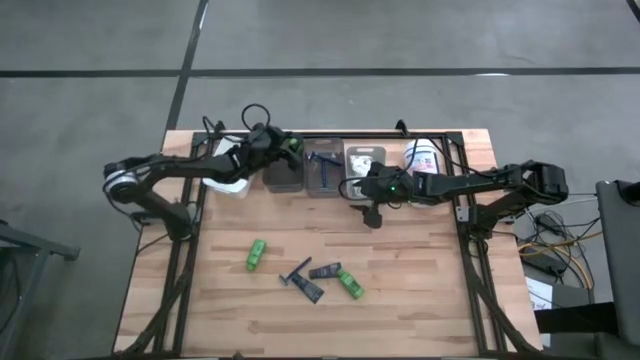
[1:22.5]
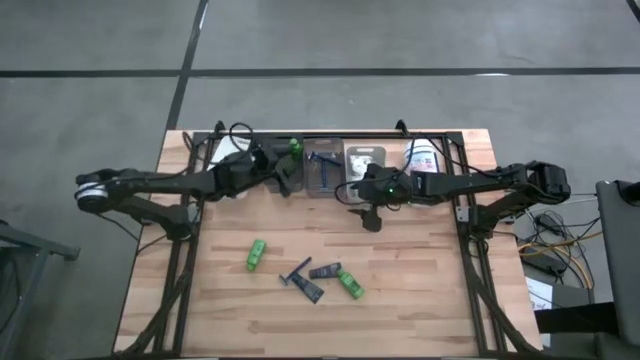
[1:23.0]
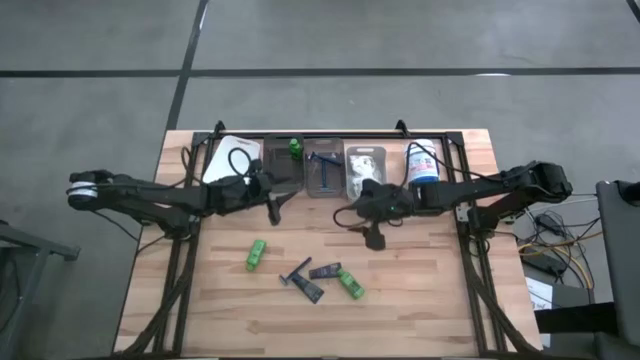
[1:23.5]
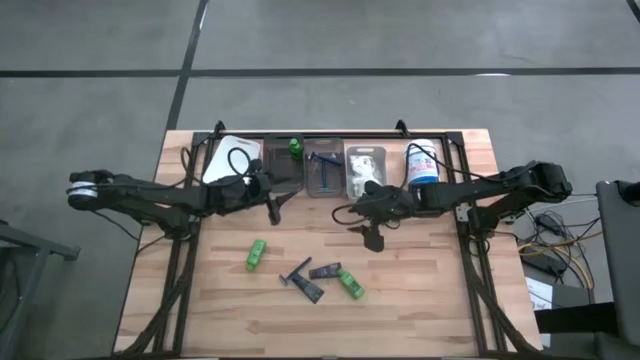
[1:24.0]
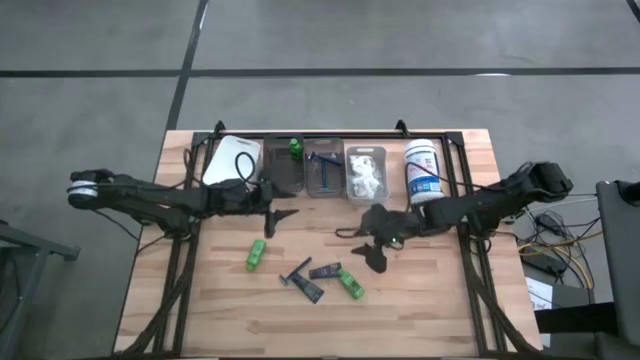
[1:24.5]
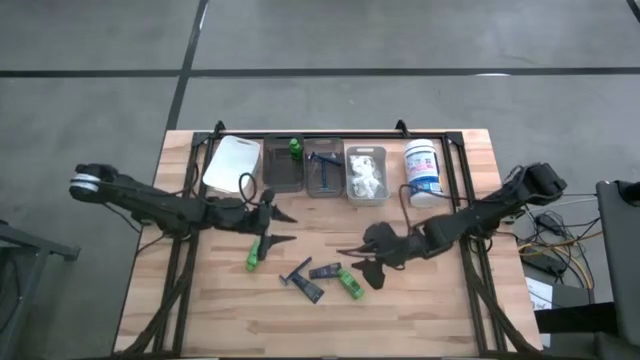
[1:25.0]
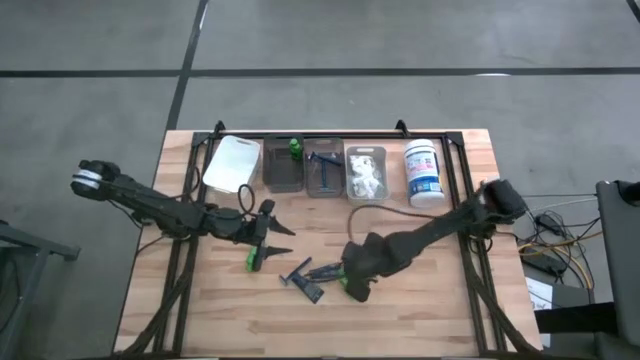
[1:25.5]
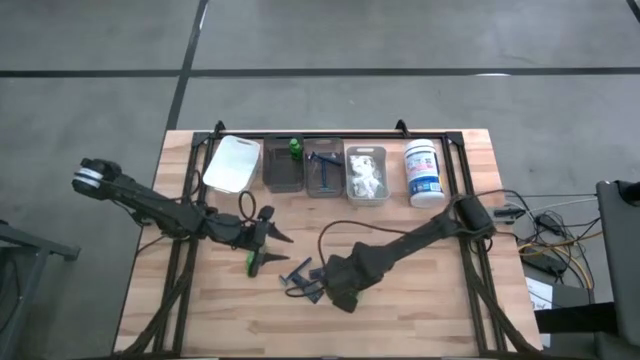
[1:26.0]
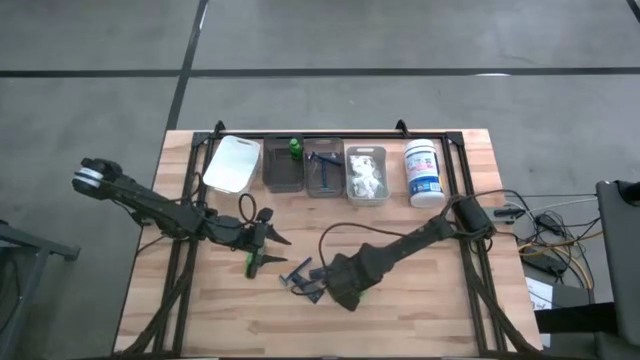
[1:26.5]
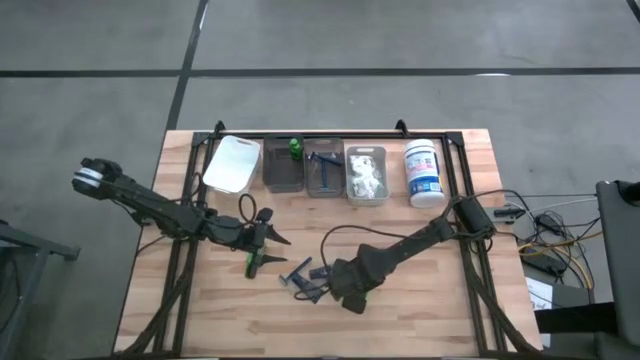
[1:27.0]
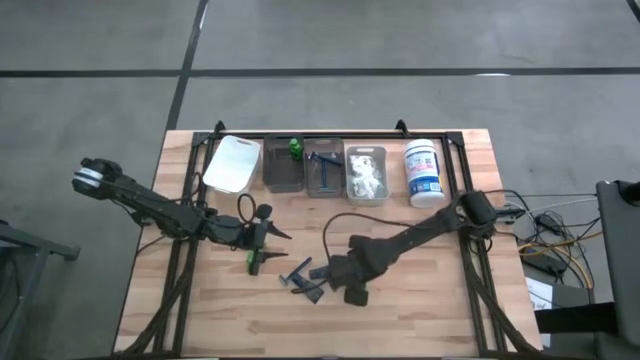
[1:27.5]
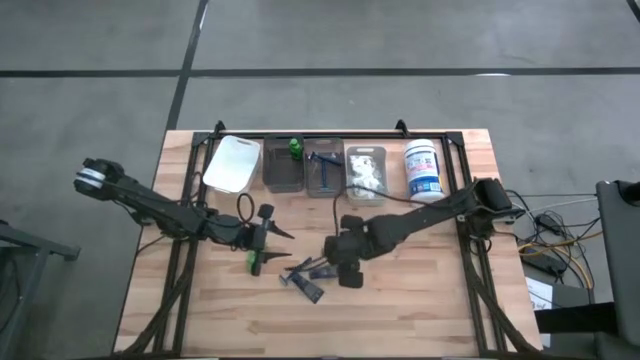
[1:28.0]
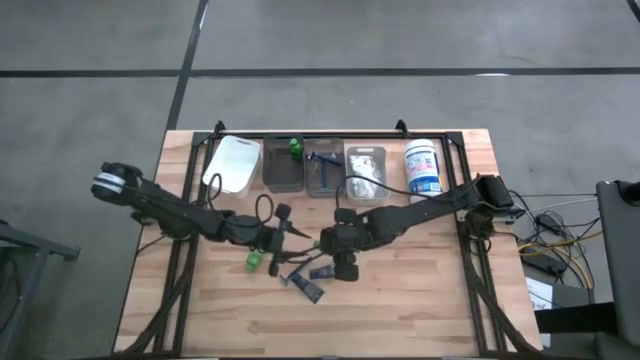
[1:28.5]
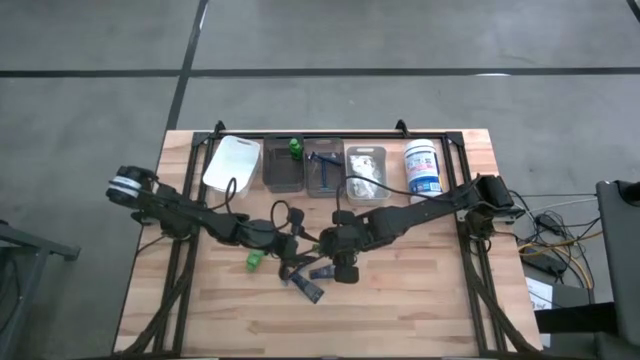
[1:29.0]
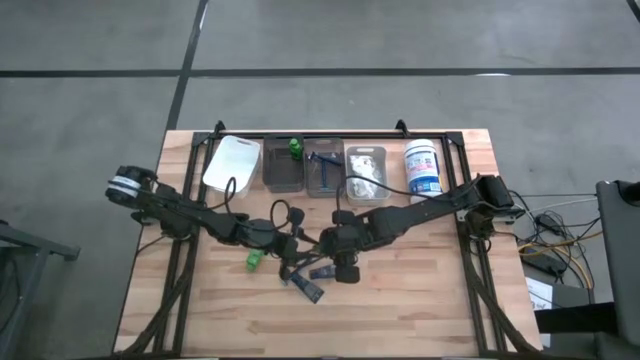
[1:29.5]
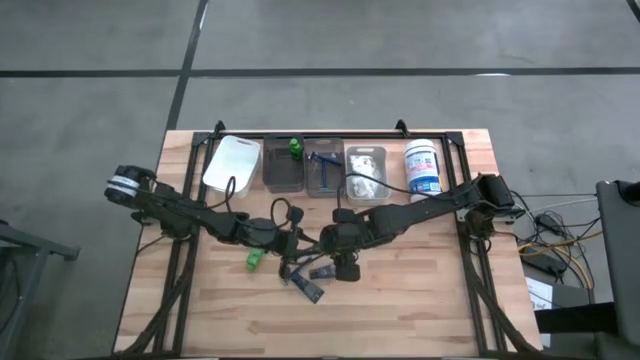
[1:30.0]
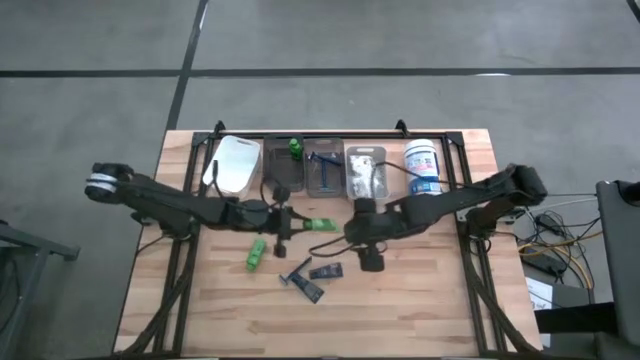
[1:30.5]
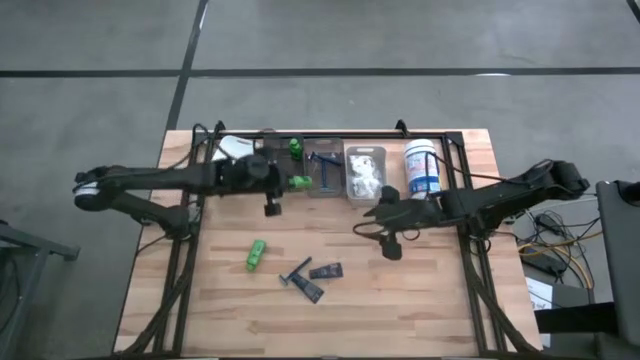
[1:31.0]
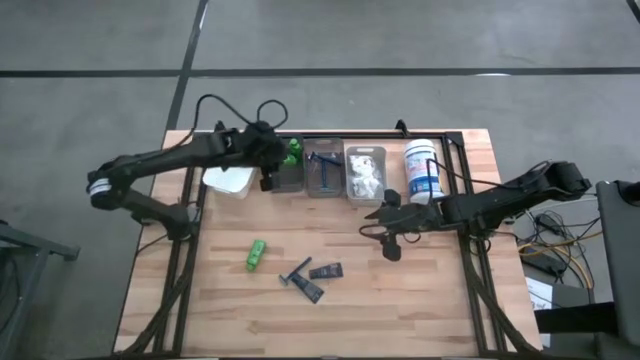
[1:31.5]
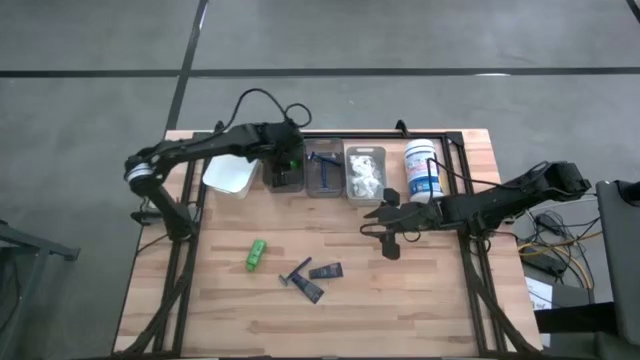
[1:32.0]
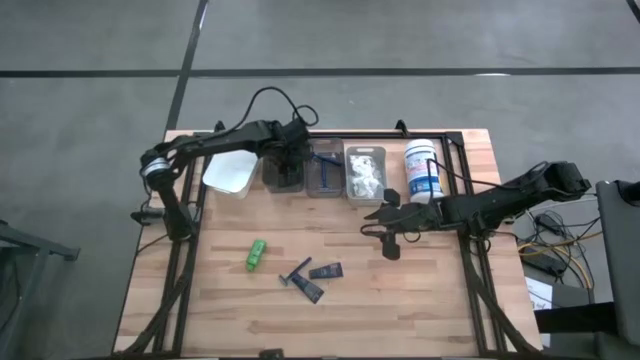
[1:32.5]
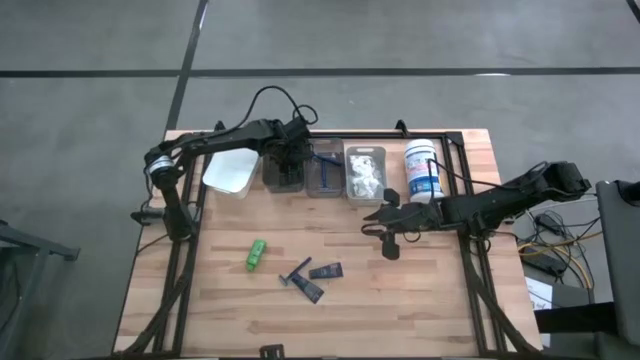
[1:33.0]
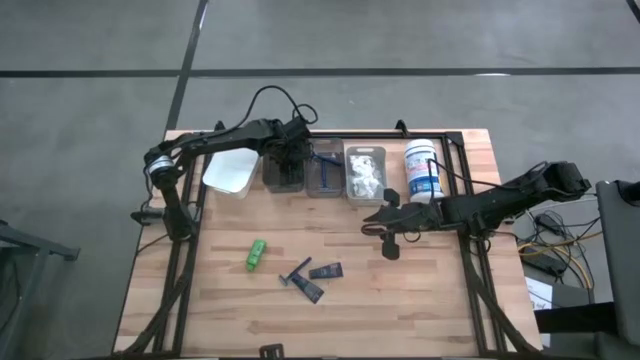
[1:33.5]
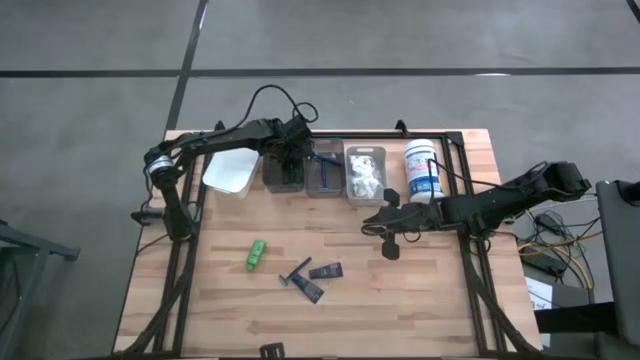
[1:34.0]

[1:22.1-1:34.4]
Task: Pick & Place Travel size toiletries
Put the right shampoo into the left black bin

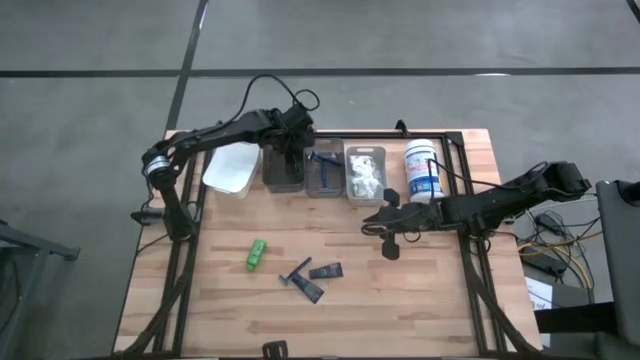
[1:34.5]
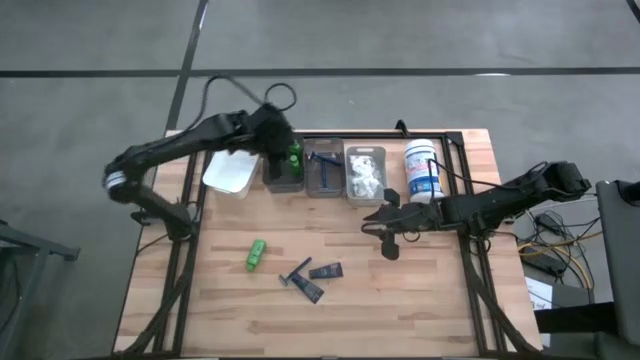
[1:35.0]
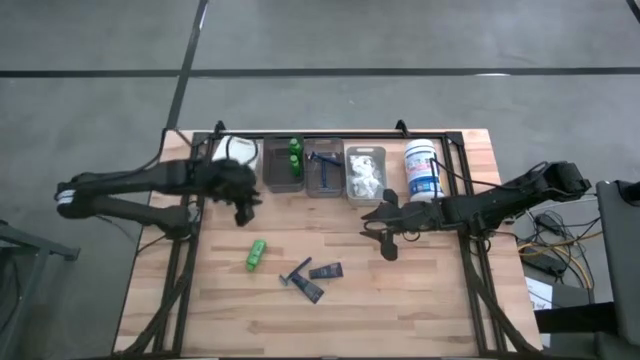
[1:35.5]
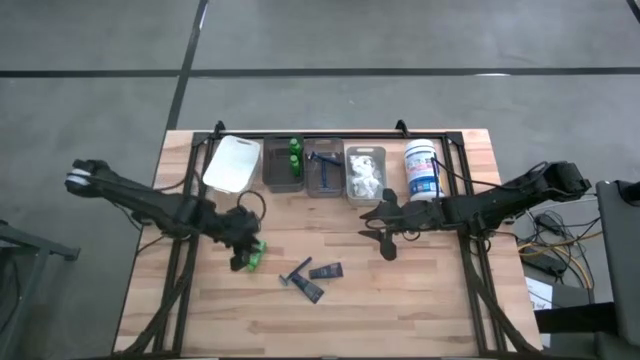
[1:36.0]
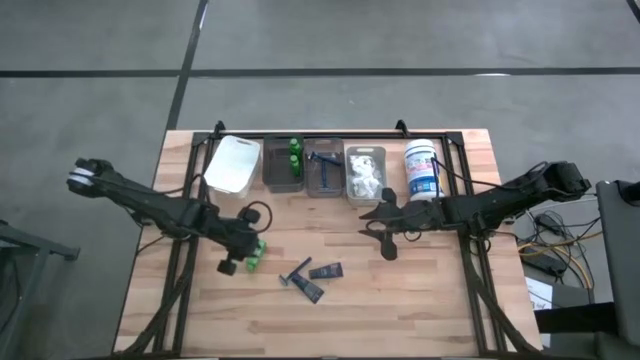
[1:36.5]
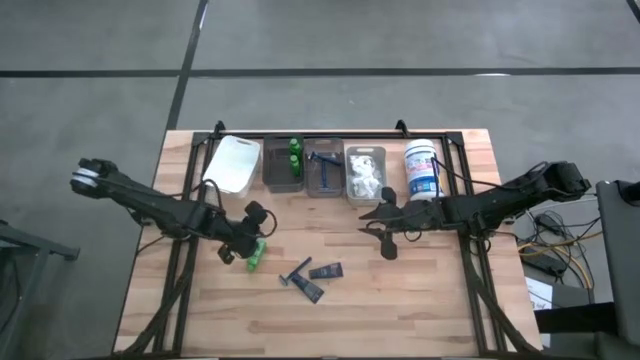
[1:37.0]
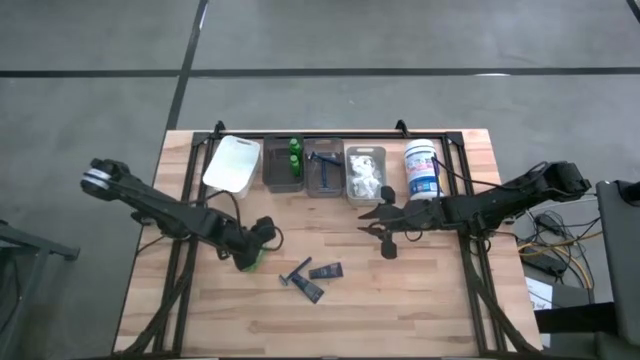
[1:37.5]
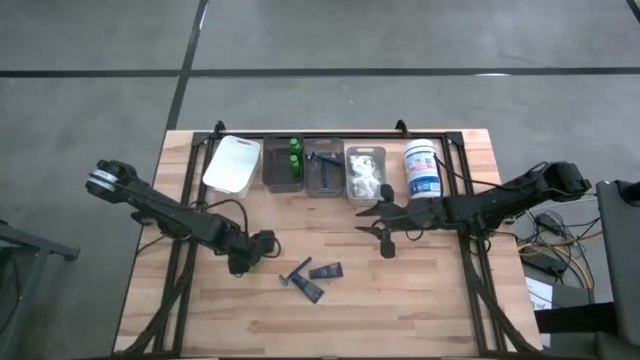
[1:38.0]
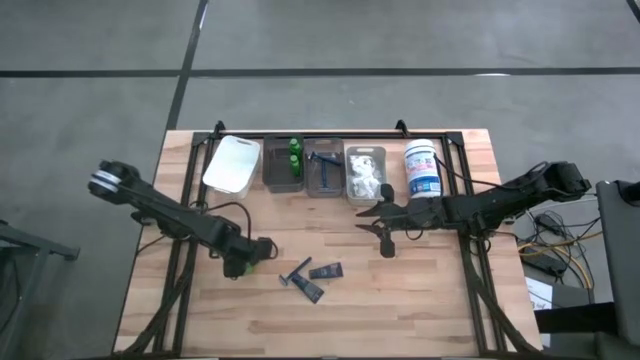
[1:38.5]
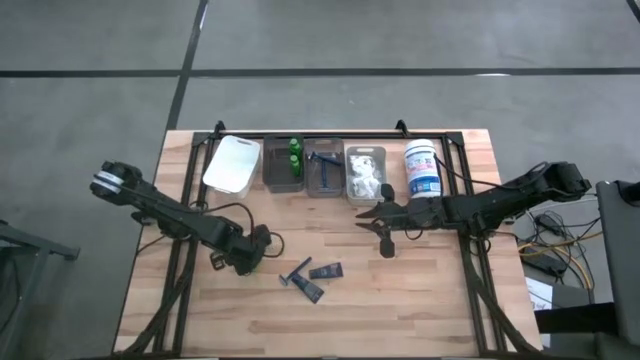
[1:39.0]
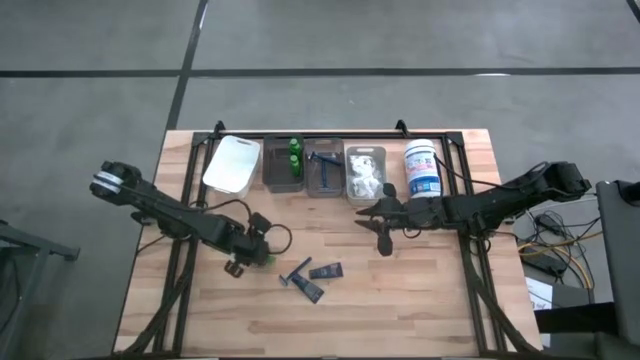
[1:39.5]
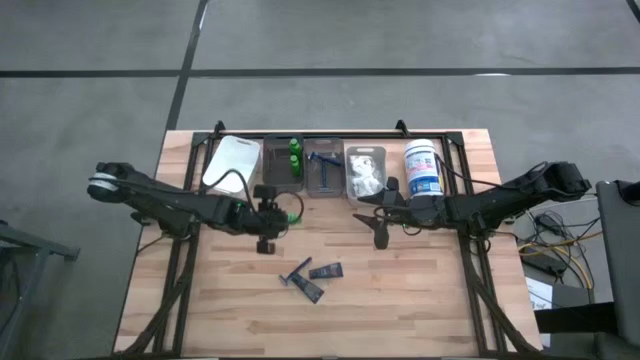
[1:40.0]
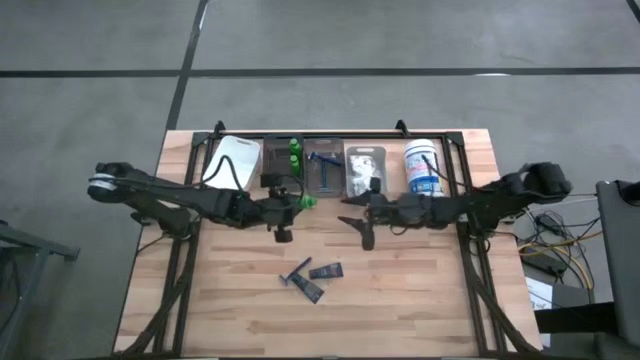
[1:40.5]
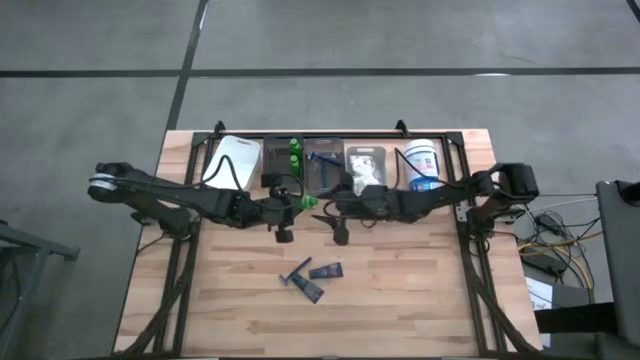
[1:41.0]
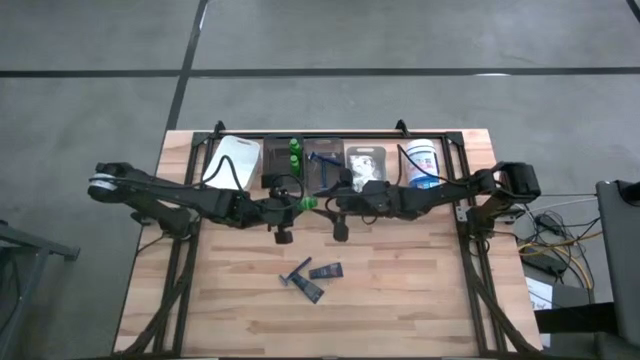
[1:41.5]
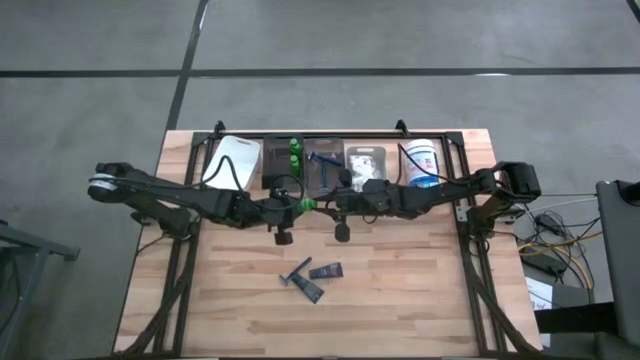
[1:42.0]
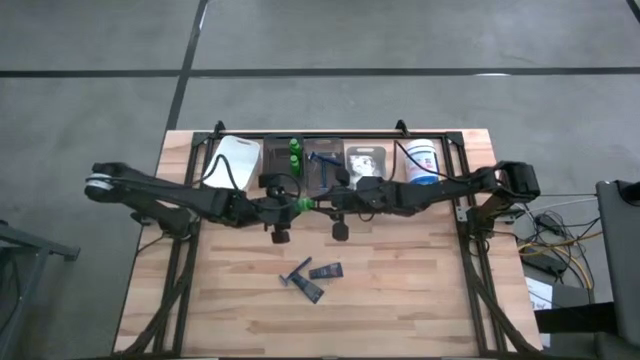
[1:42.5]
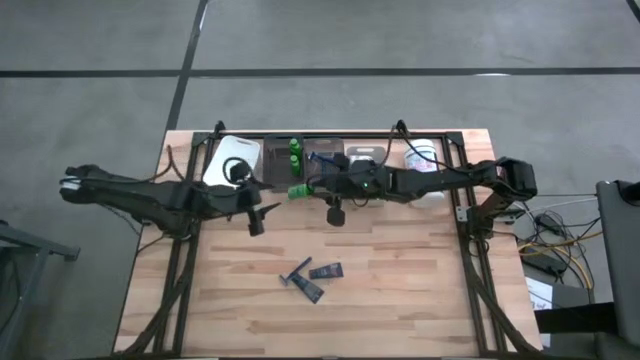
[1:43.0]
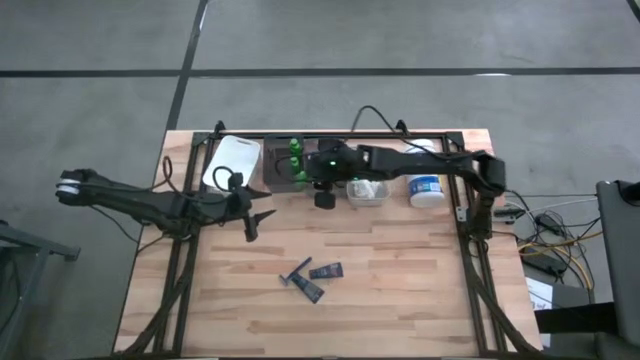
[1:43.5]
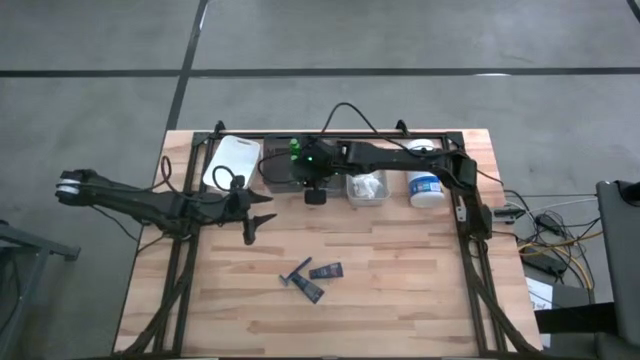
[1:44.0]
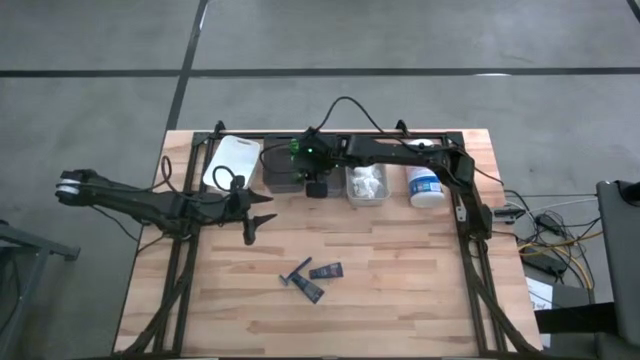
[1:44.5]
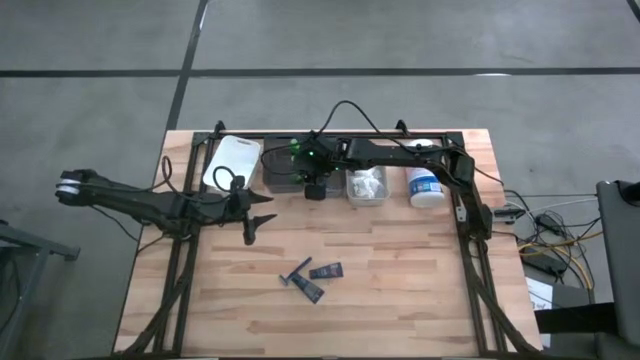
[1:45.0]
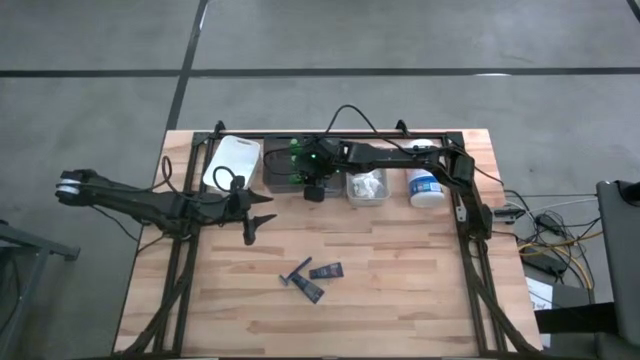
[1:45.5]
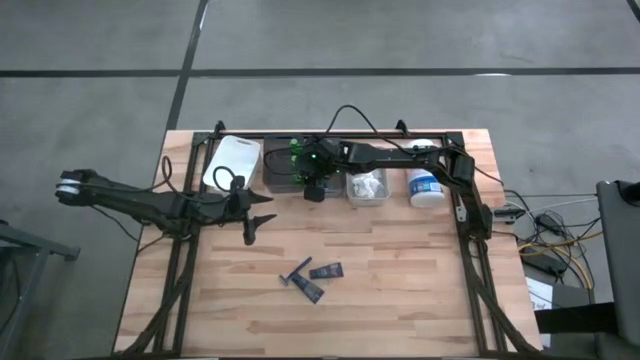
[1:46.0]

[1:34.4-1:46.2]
Put the shampoo into the left black bin
